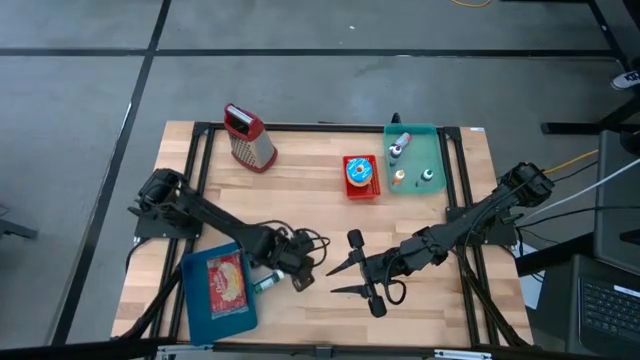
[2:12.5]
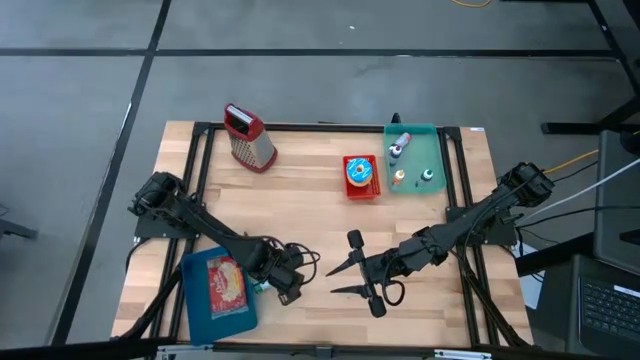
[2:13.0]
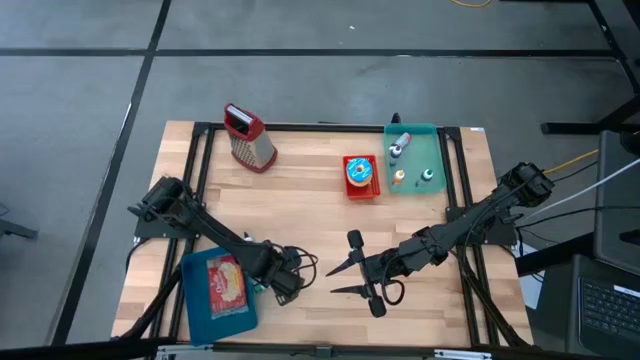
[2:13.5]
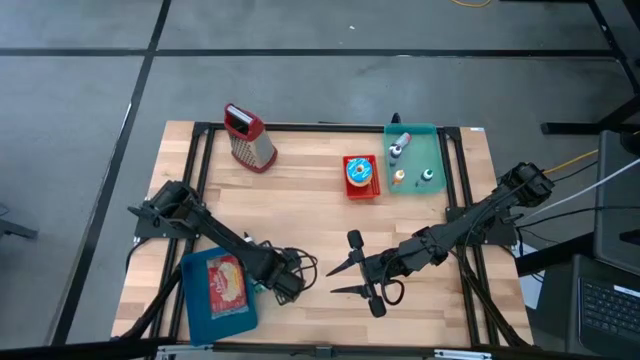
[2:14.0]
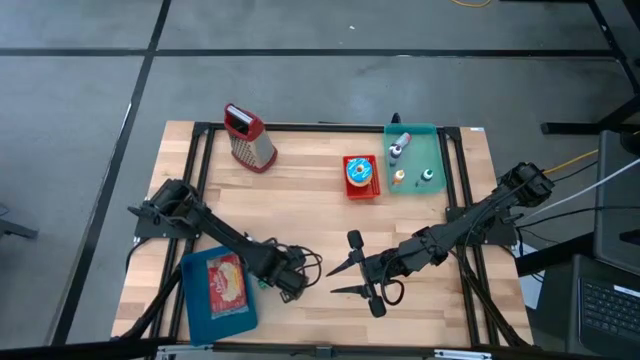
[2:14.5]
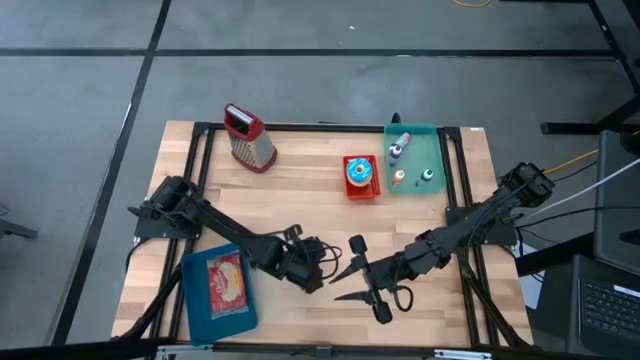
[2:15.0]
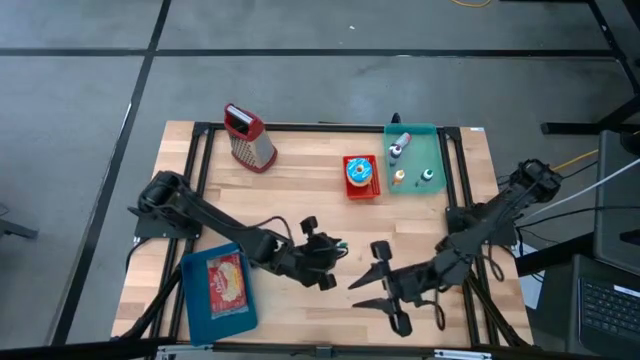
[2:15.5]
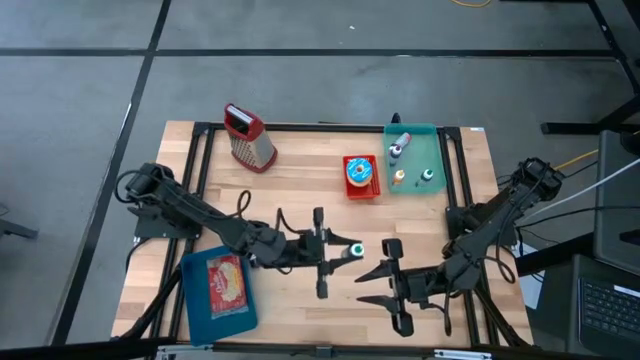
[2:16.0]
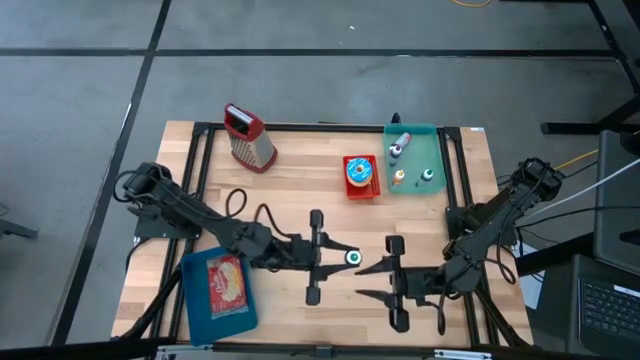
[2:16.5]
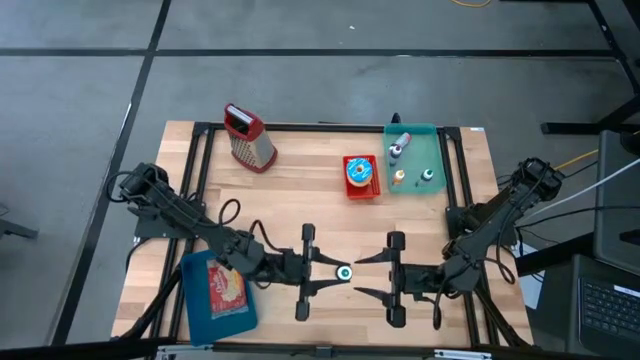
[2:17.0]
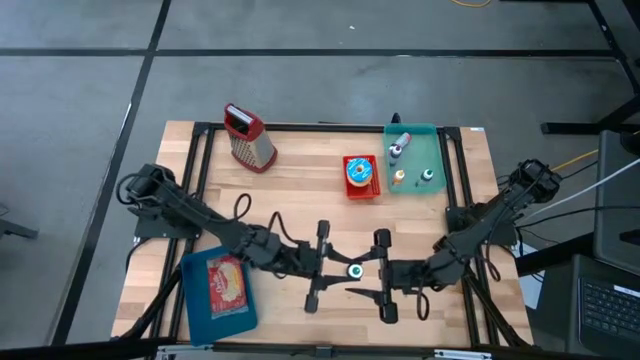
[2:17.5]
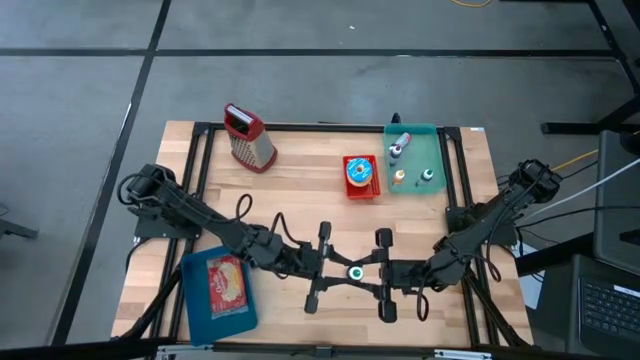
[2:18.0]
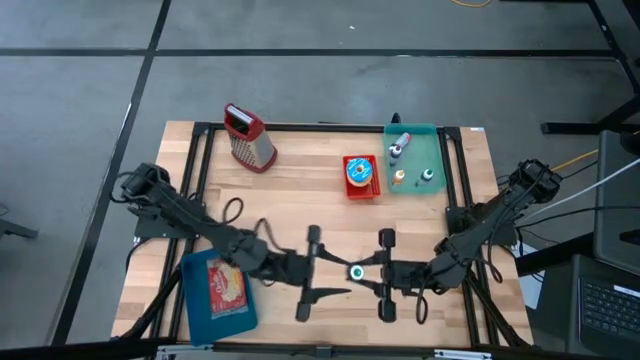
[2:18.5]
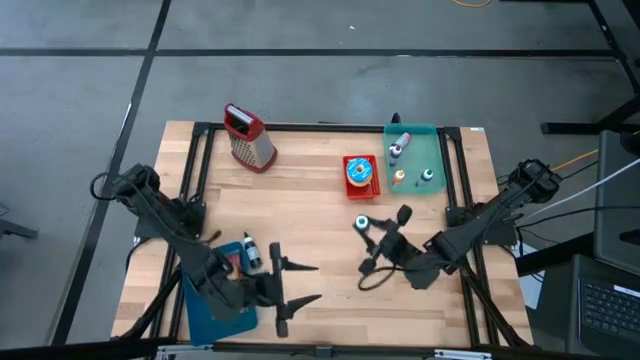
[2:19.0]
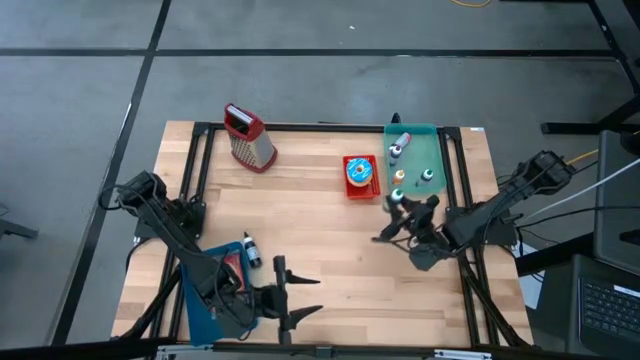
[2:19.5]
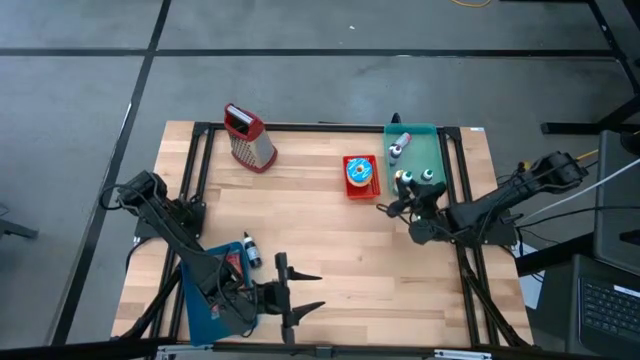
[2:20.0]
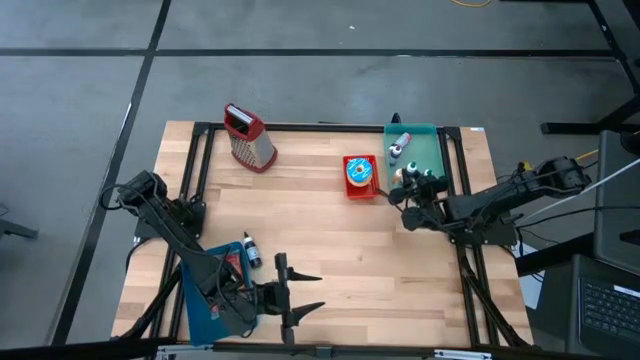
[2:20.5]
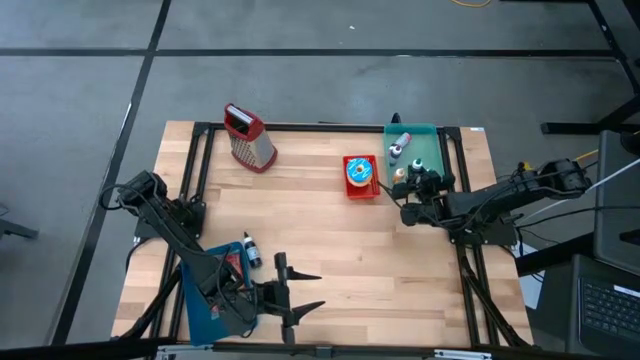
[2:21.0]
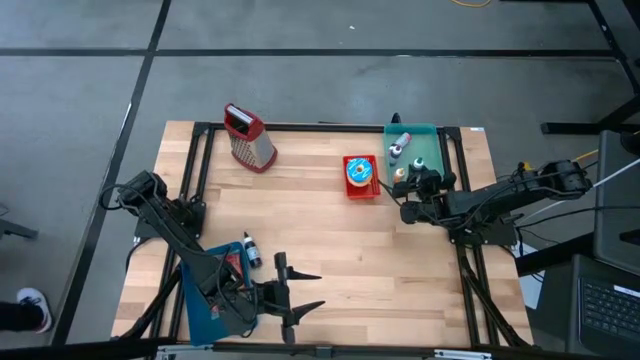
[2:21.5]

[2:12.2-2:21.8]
Put the green food coloring bottle into the light green bin

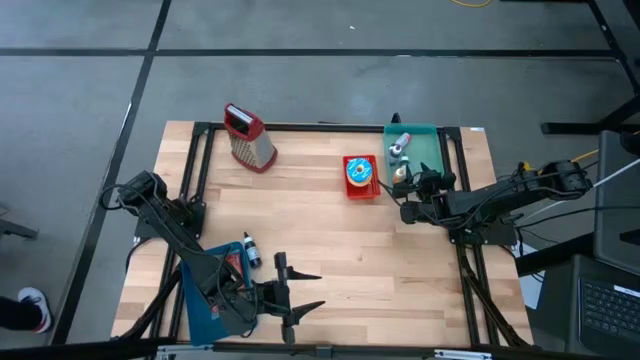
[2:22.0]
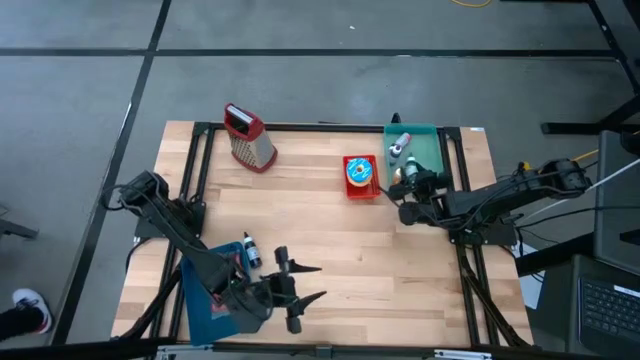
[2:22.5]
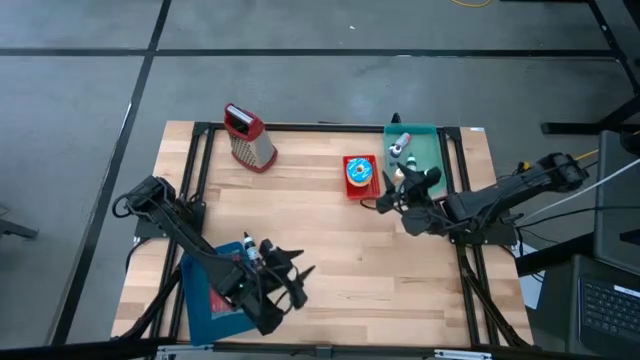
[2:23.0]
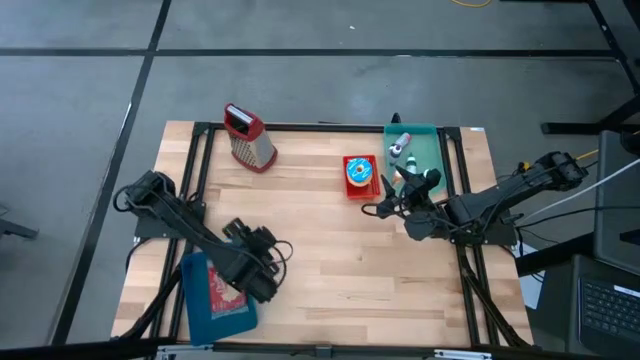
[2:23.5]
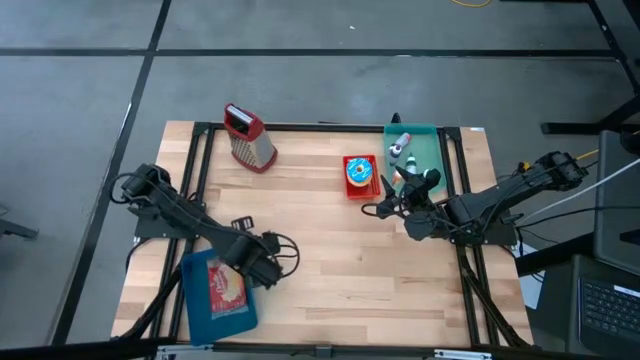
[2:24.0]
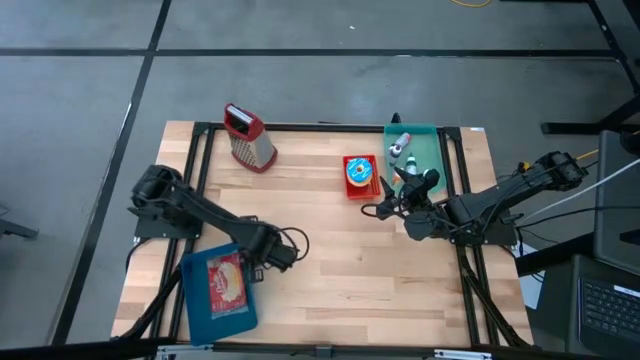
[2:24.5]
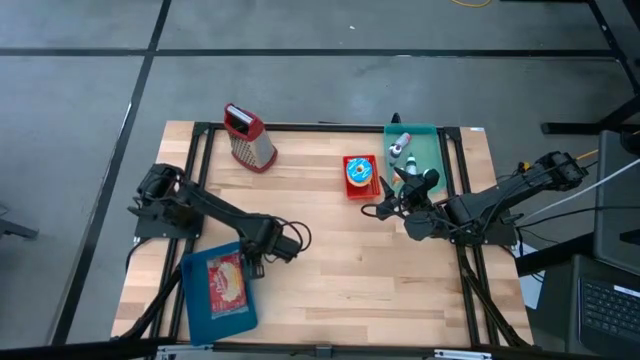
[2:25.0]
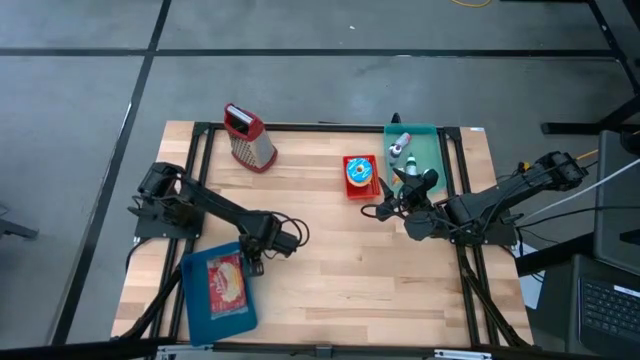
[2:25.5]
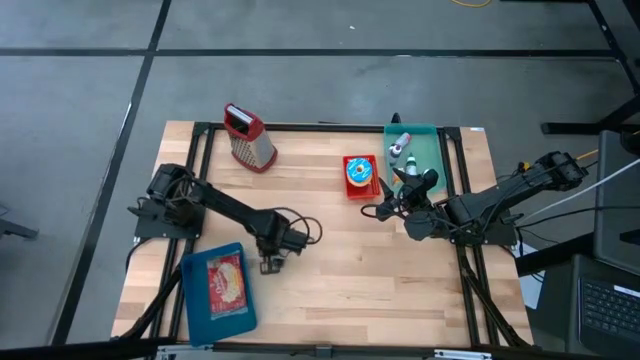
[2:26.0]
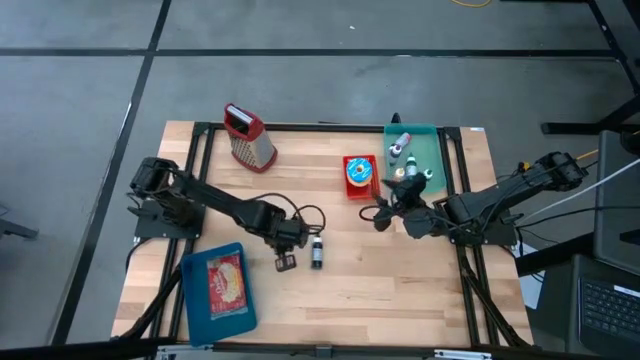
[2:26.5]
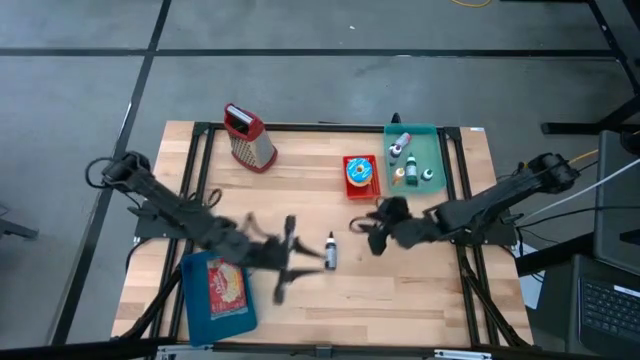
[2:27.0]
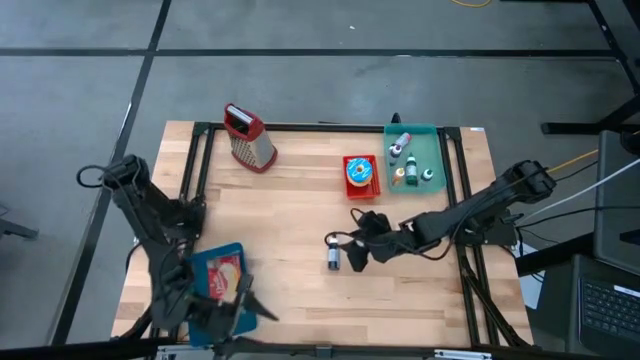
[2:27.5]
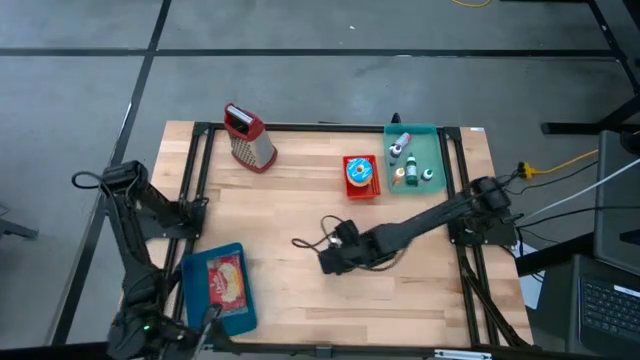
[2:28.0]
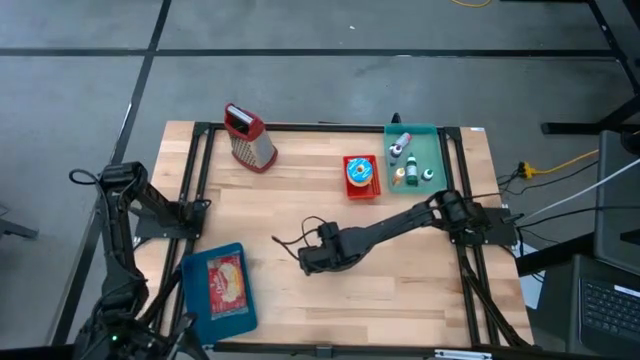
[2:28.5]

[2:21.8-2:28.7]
Put the black food coloring bottle into the light green bin

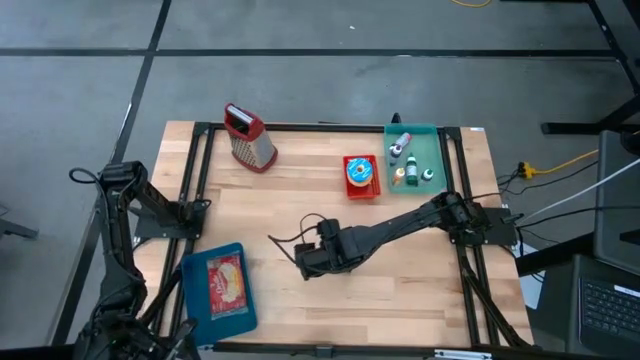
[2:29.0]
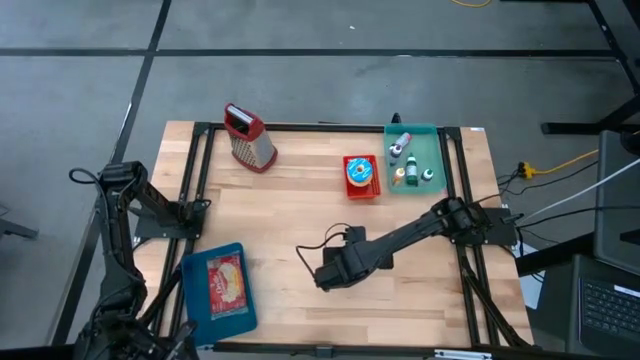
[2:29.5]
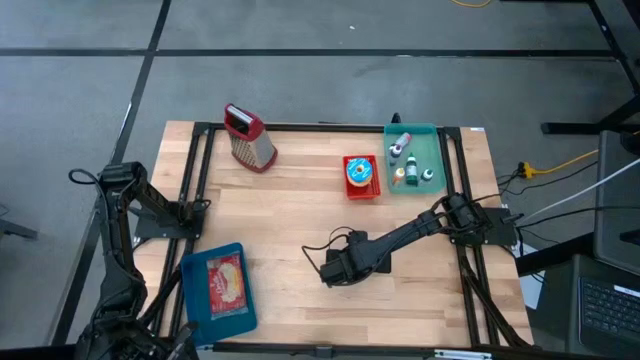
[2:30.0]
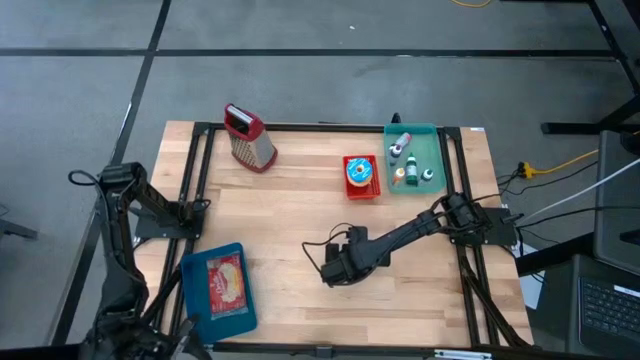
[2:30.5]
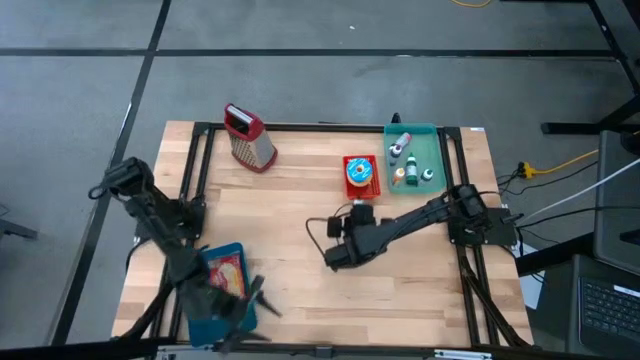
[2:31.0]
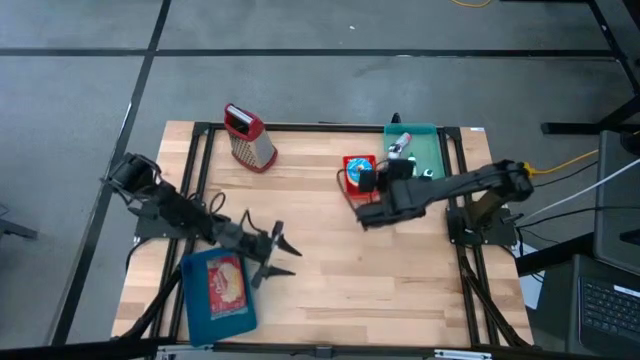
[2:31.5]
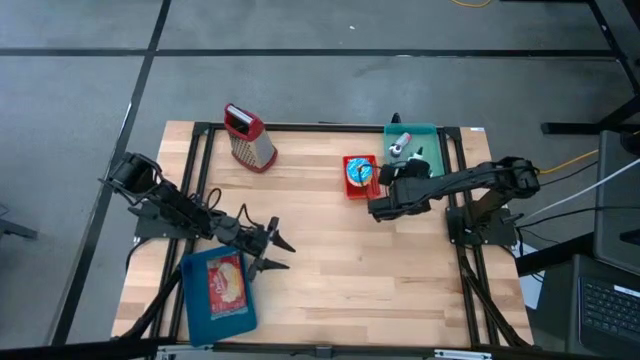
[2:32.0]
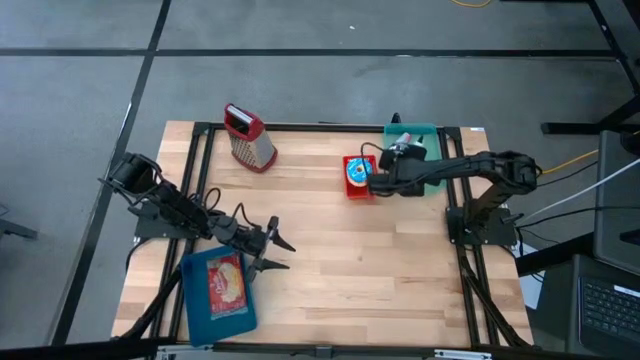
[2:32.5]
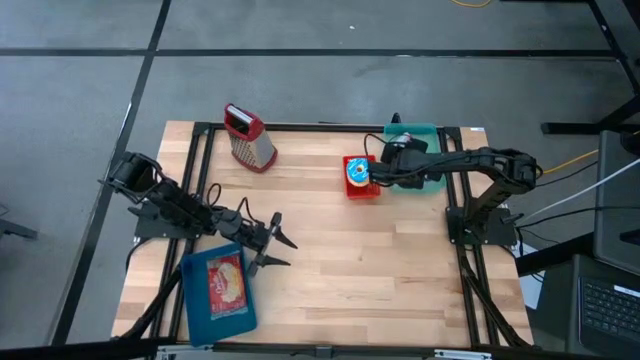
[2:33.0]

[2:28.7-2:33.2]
Put the black food coloring bottle into the light green bin
